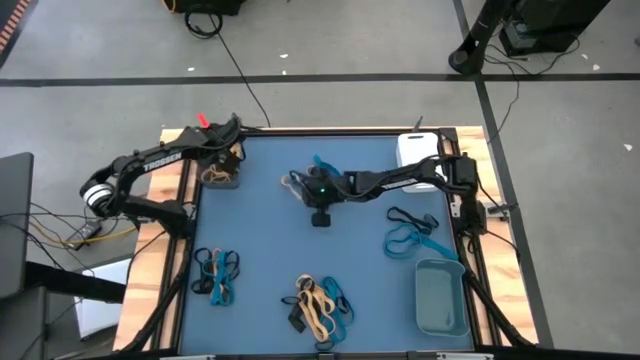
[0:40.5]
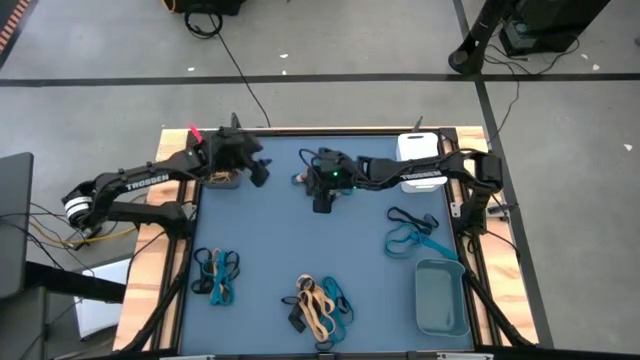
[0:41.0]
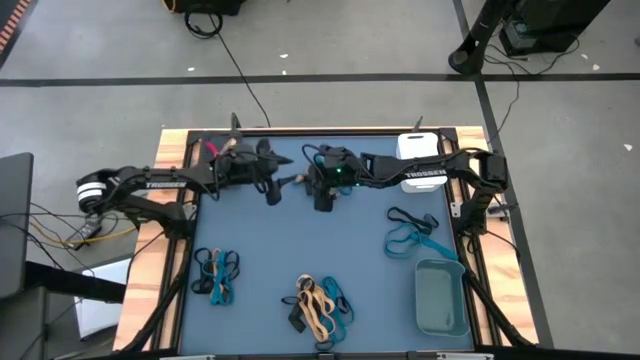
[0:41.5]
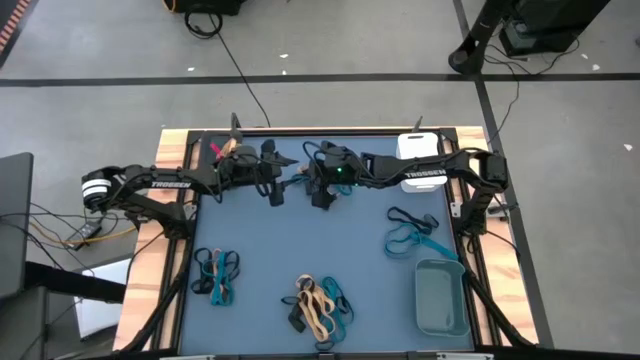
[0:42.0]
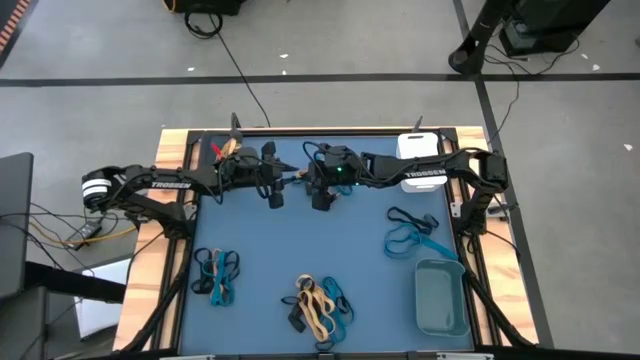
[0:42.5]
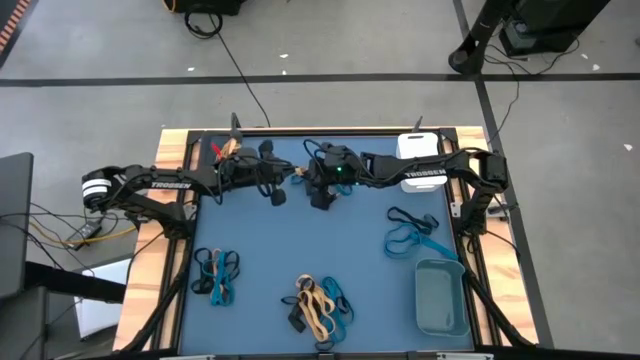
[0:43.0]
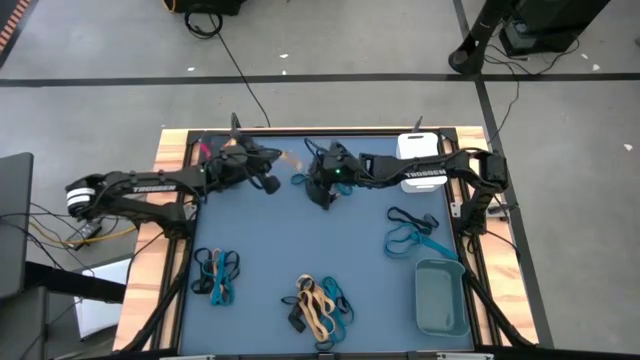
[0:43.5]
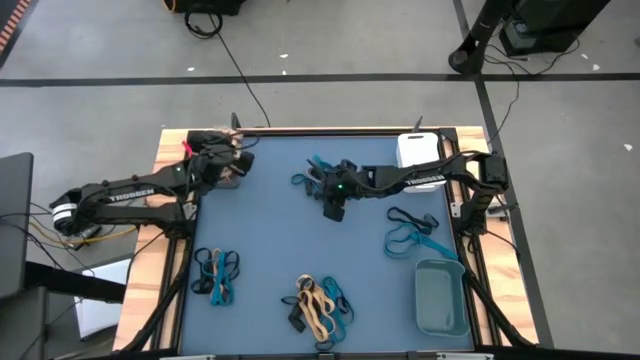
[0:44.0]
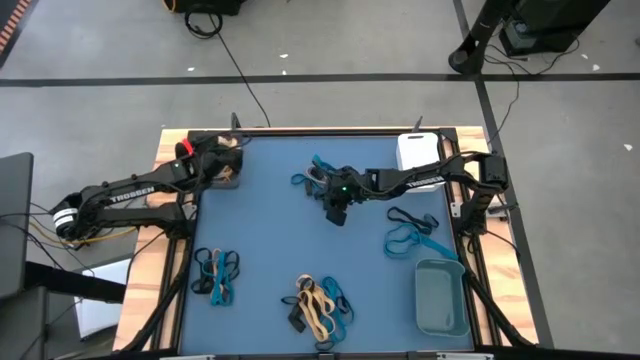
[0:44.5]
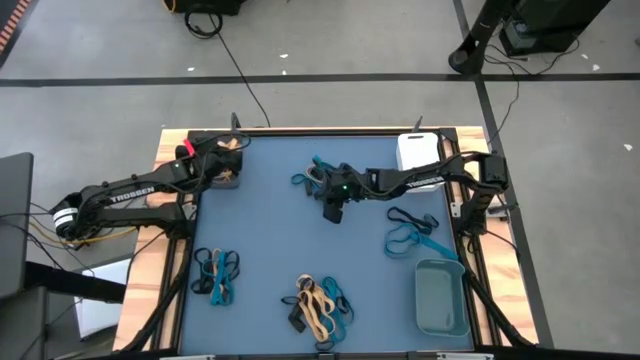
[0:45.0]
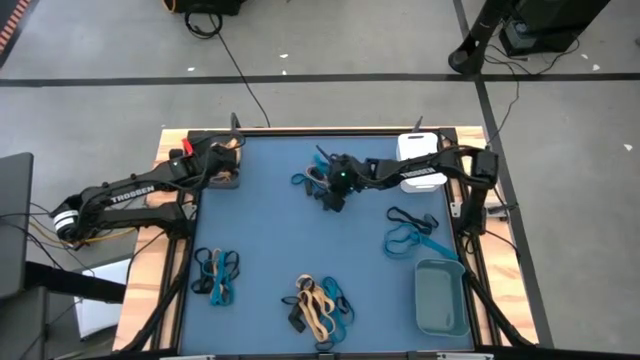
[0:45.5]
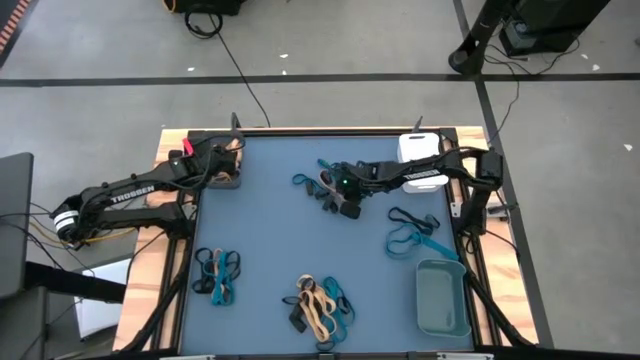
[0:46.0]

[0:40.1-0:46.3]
Task: Sort rubber bands into baskets
Put the yellow rubber band into the black bin

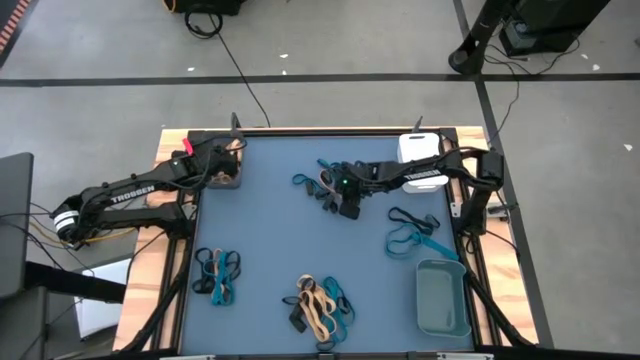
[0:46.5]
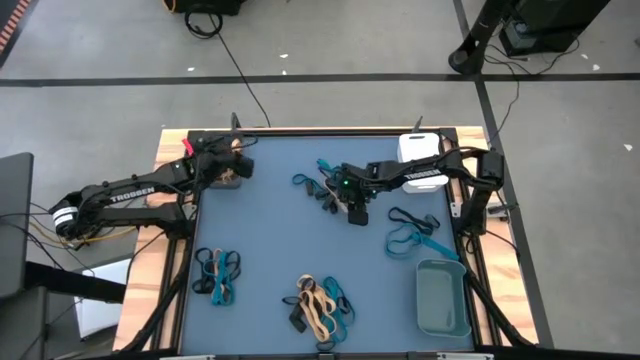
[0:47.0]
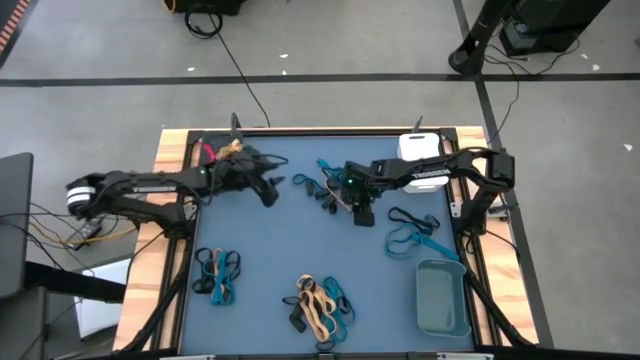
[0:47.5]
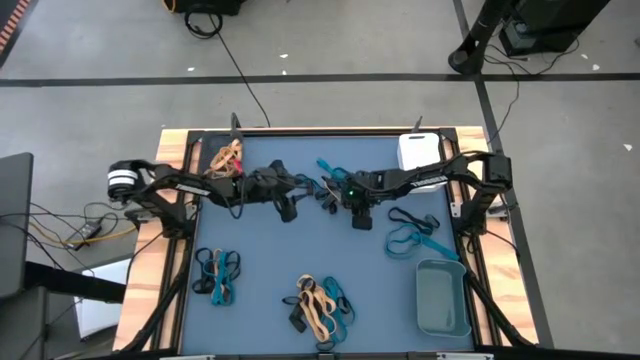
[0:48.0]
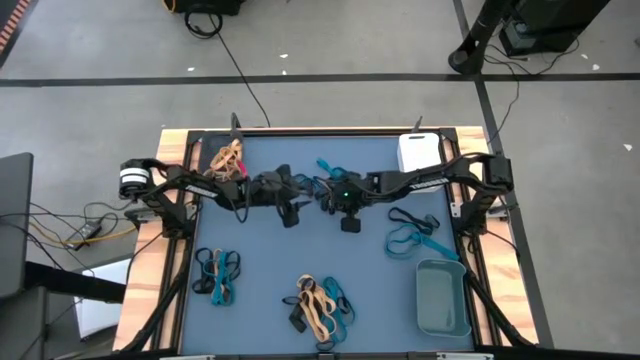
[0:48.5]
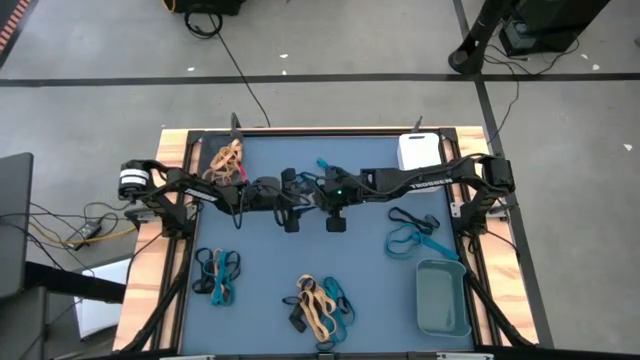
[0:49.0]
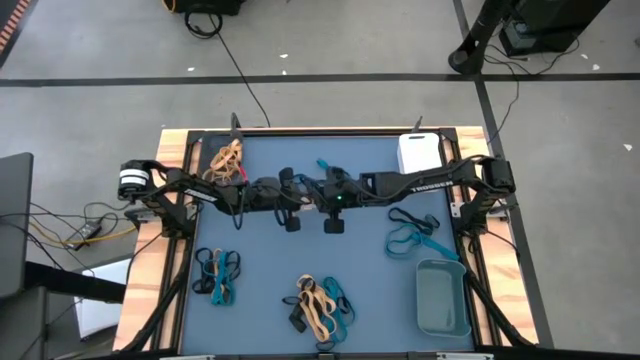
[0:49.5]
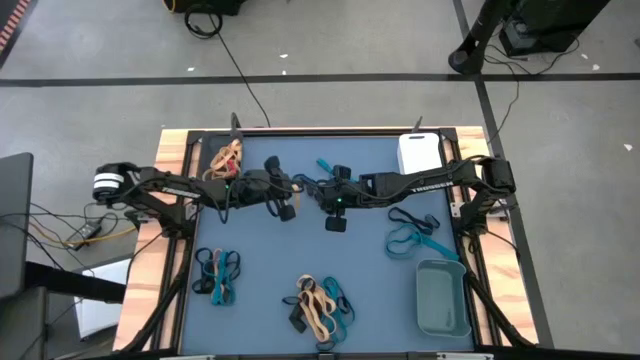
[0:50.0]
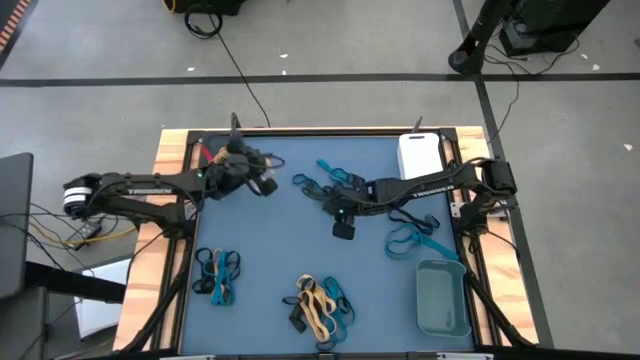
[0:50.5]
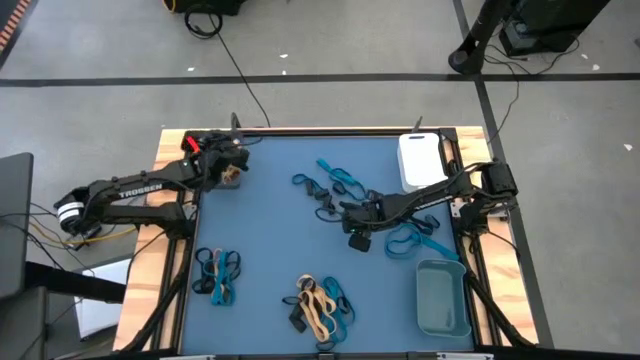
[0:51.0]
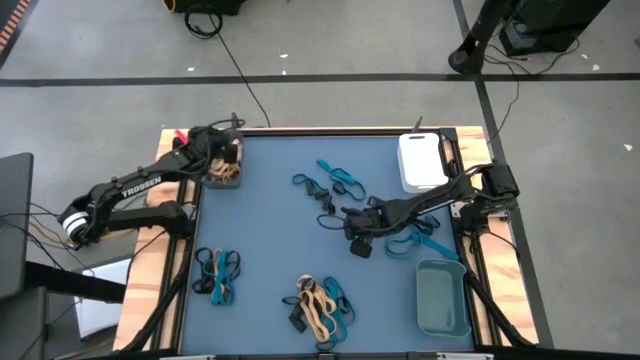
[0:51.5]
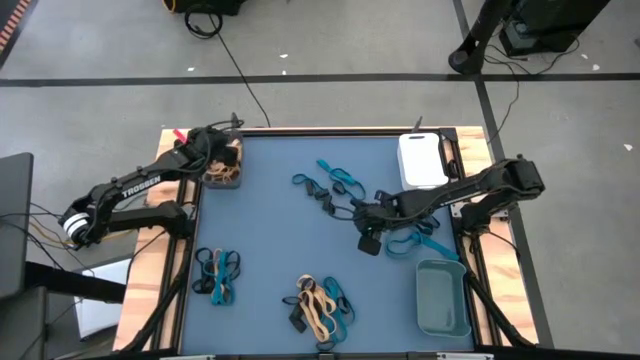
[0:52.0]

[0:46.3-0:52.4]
Put the yellow rubber band into the black bin

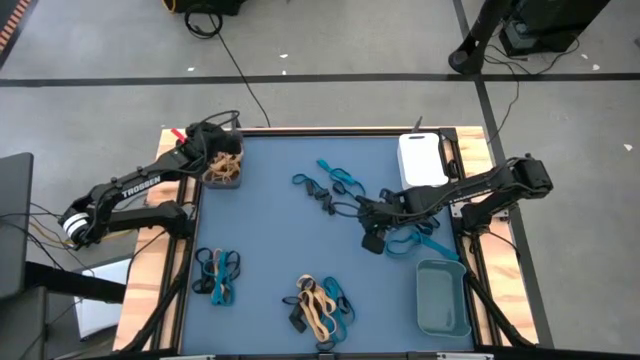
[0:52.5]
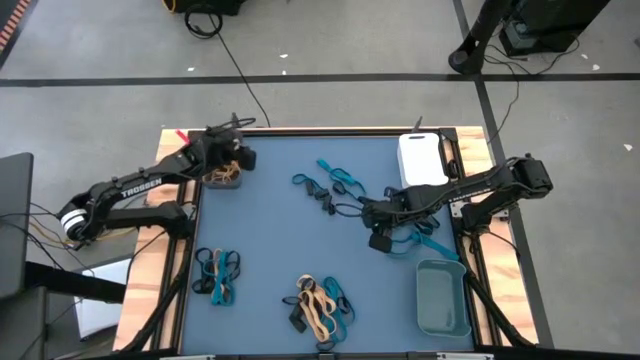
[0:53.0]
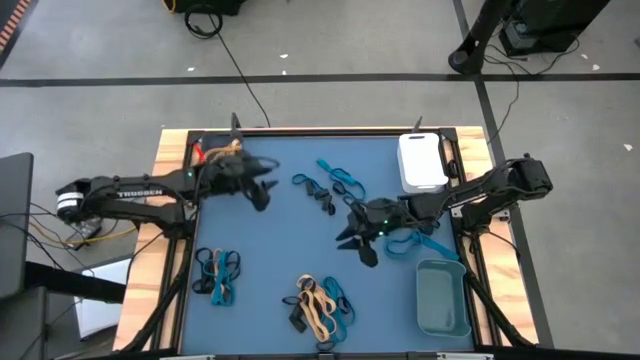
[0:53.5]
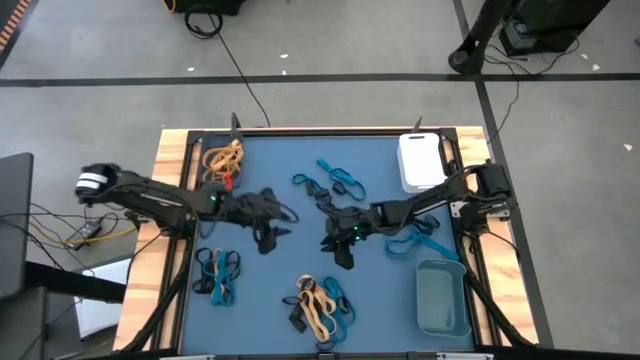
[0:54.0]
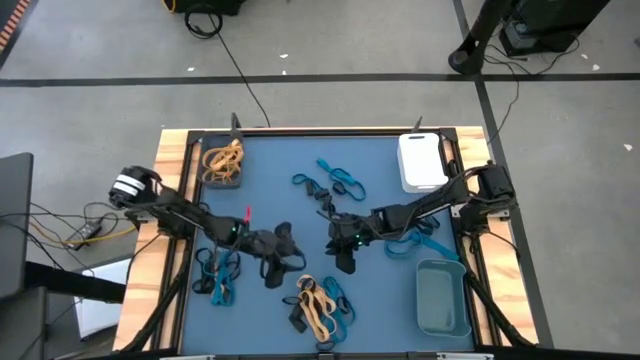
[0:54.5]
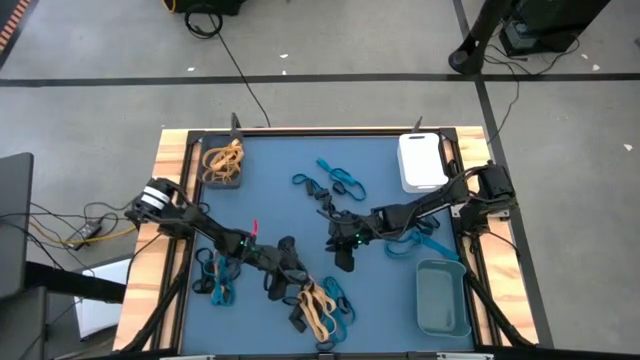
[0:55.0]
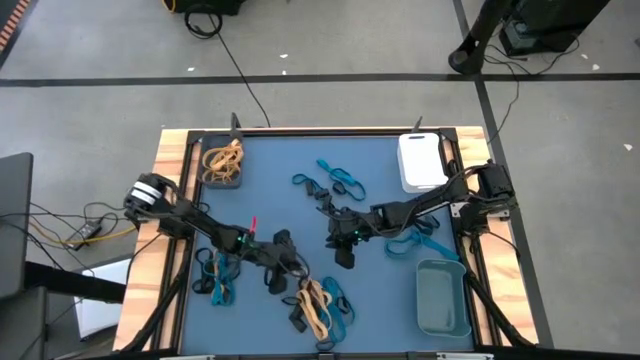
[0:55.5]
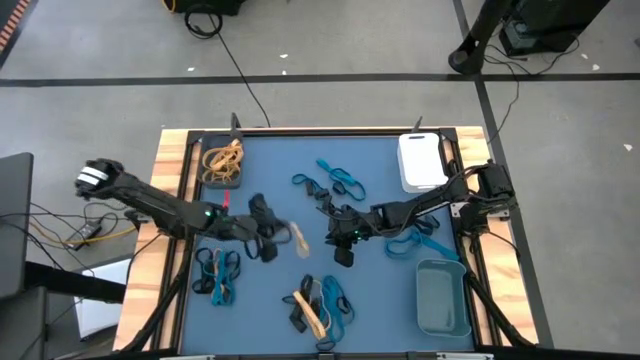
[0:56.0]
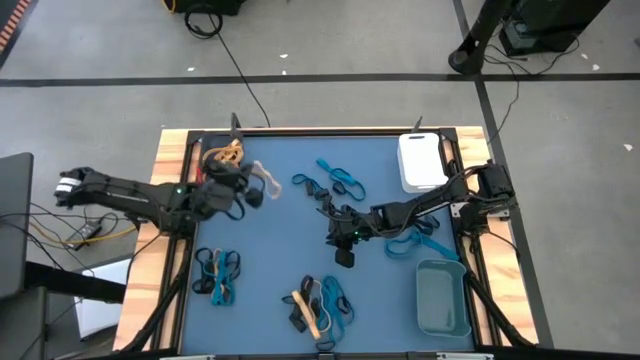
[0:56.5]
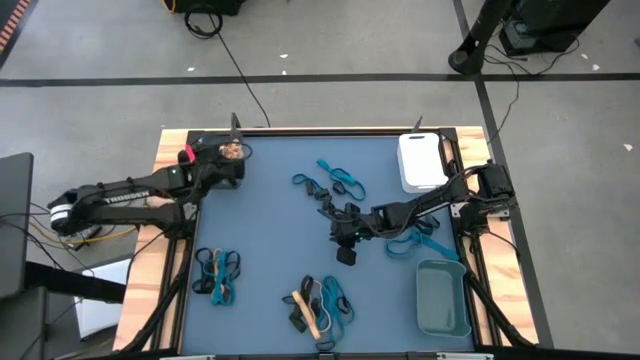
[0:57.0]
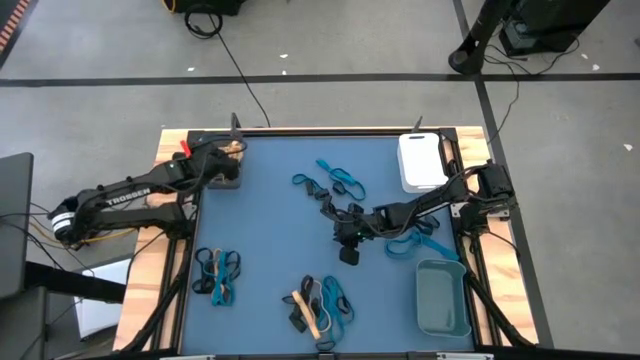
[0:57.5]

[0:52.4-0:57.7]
Put the yellow rubber band into the black bin

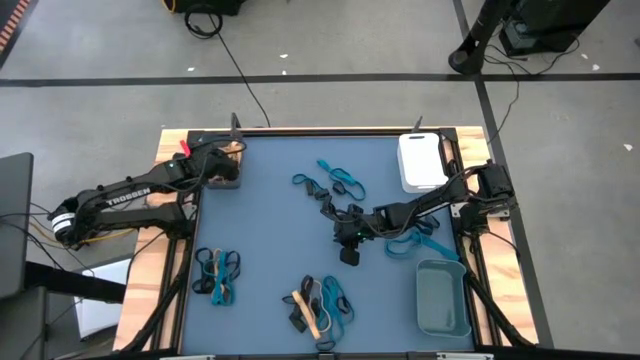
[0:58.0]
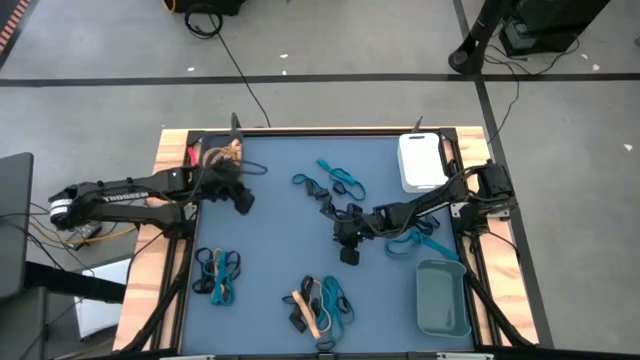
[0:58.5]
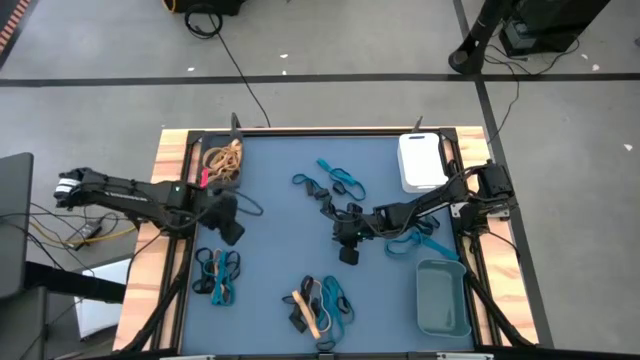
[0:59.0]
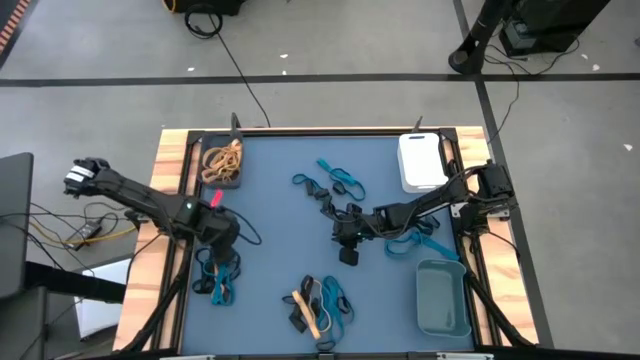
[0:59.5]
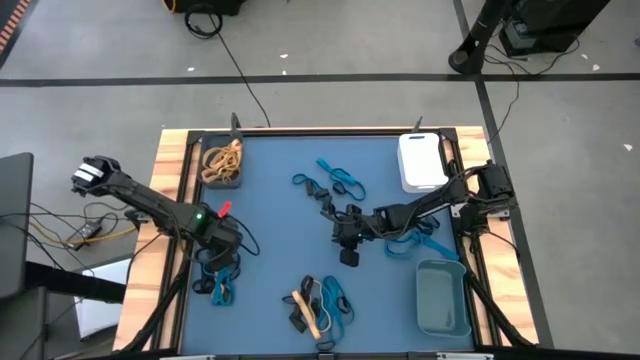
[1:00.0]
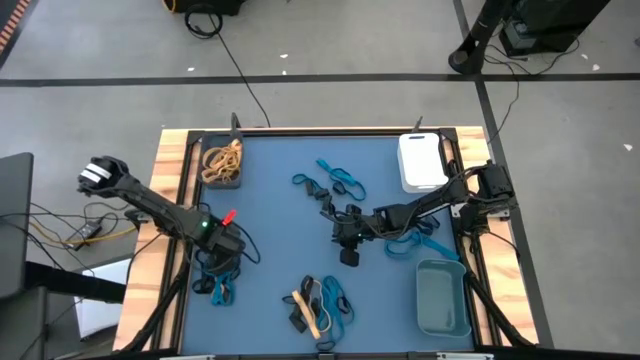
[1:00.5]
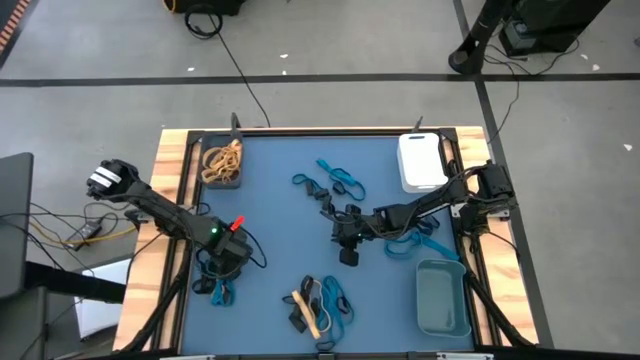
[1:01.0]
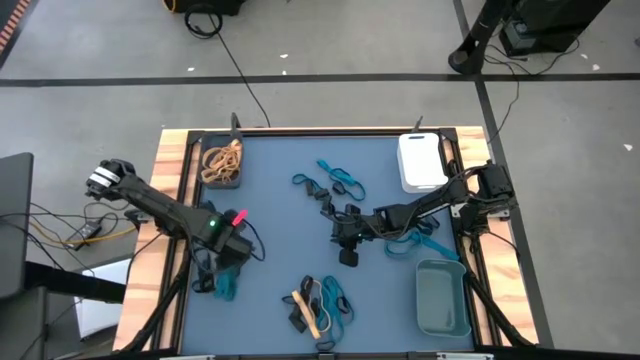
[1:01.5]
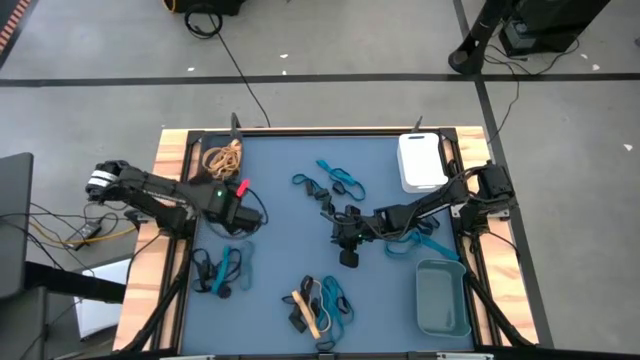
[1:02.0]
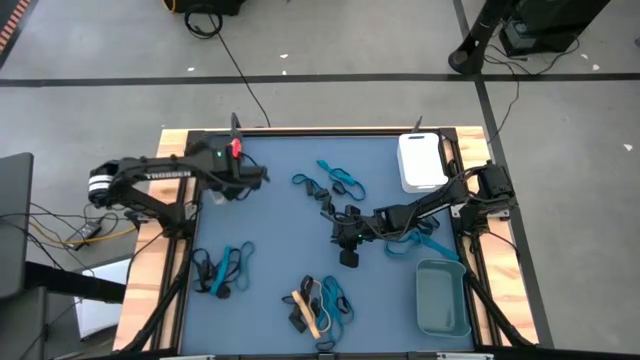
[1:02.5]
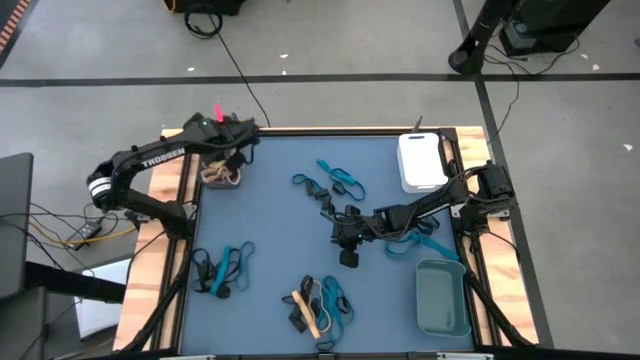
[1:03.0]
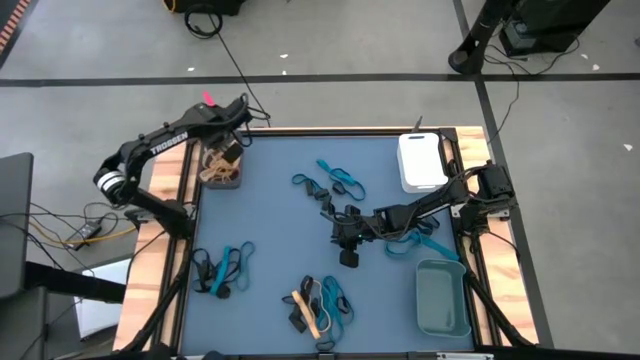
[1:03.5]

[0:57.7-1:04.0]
Put the yellow rubber band into the black bin
